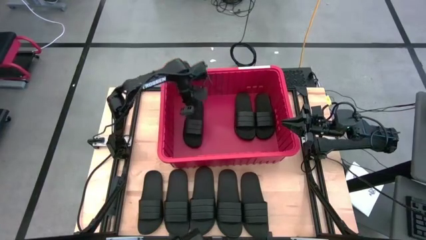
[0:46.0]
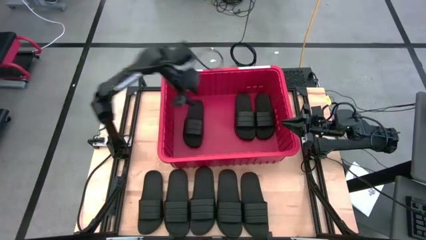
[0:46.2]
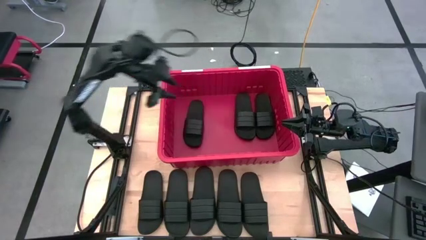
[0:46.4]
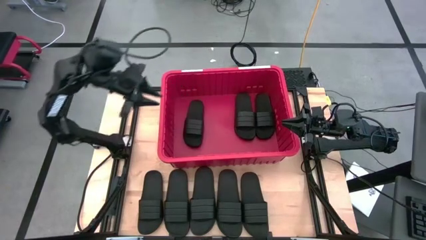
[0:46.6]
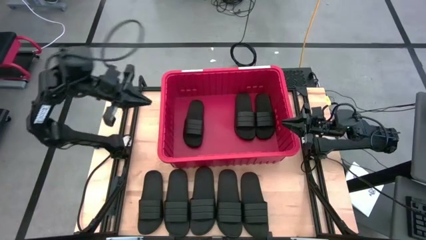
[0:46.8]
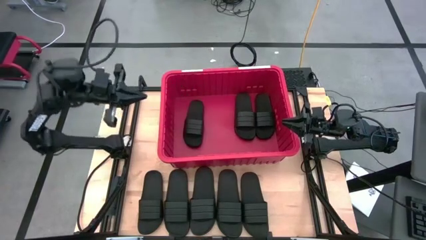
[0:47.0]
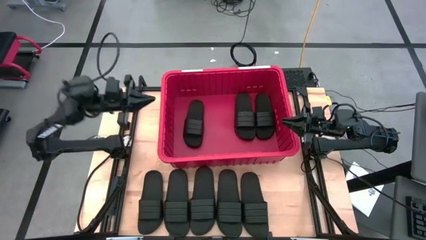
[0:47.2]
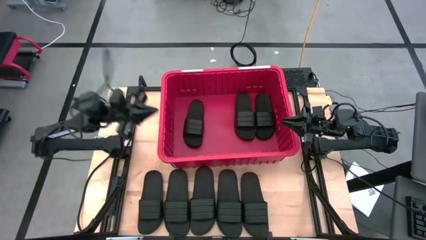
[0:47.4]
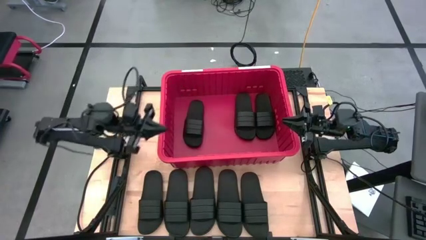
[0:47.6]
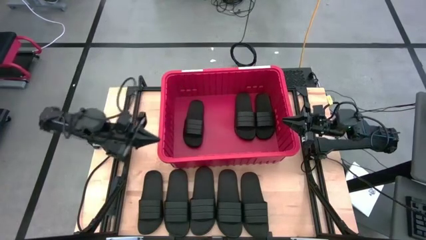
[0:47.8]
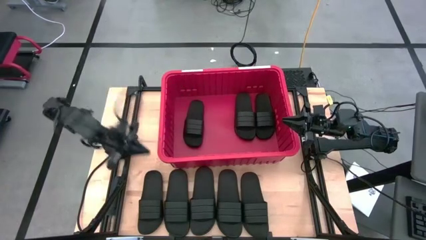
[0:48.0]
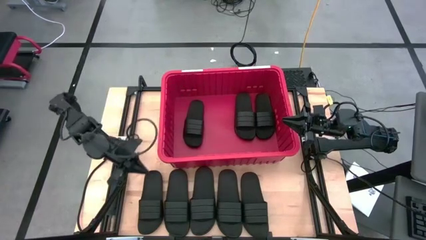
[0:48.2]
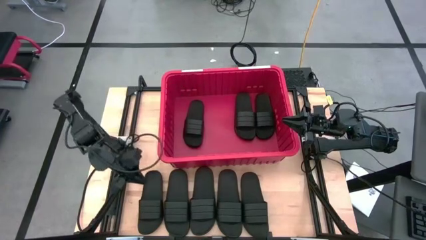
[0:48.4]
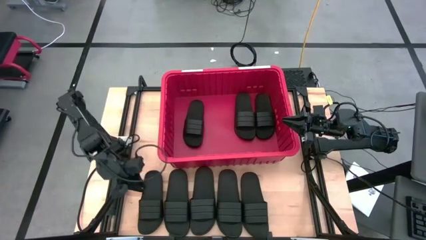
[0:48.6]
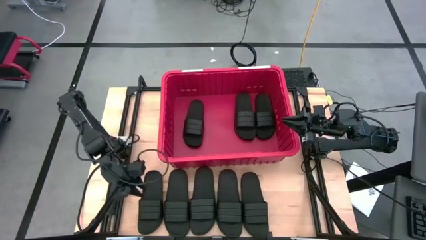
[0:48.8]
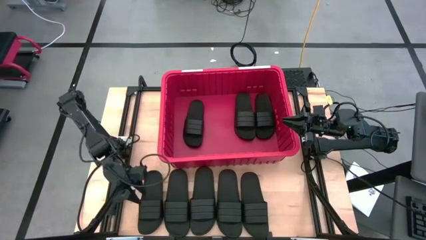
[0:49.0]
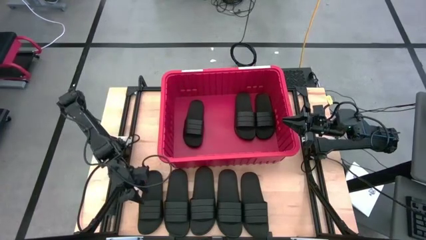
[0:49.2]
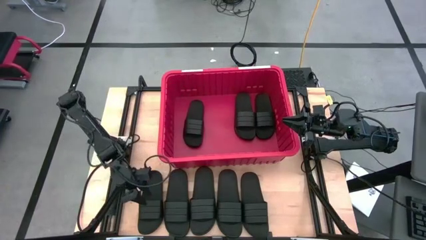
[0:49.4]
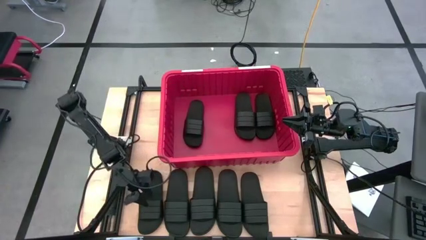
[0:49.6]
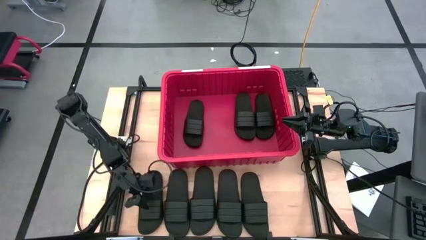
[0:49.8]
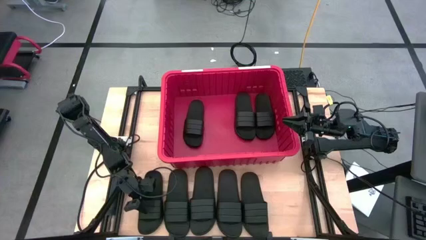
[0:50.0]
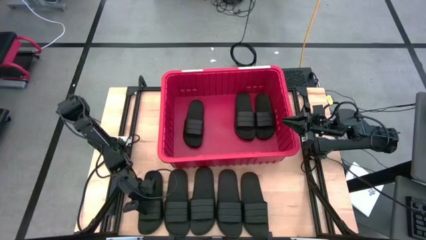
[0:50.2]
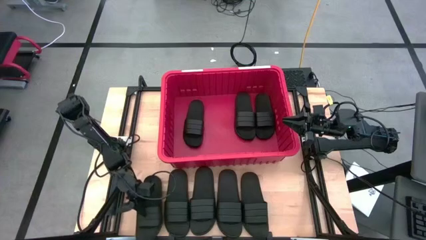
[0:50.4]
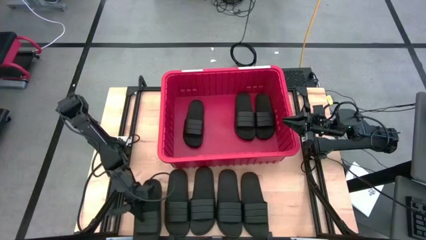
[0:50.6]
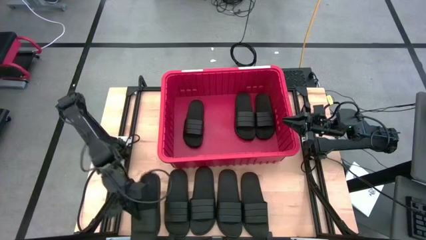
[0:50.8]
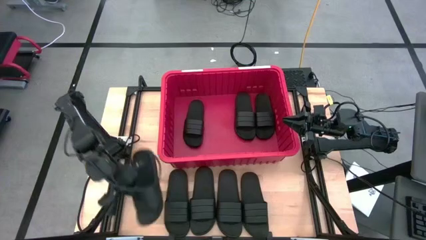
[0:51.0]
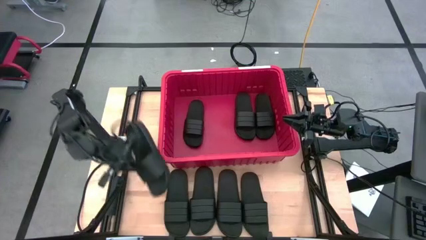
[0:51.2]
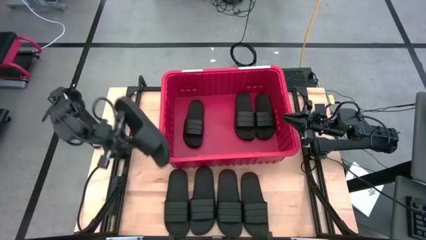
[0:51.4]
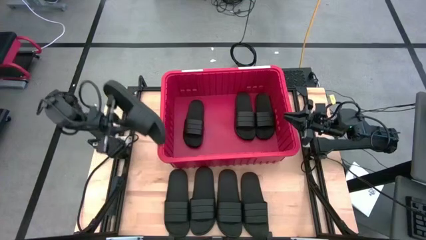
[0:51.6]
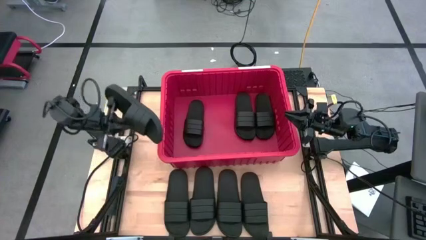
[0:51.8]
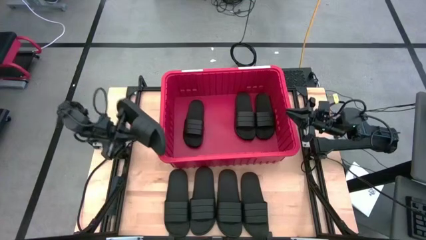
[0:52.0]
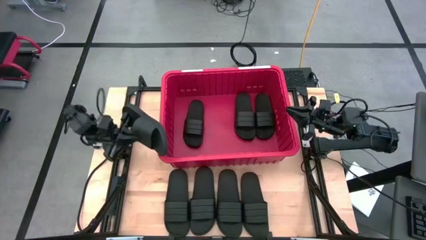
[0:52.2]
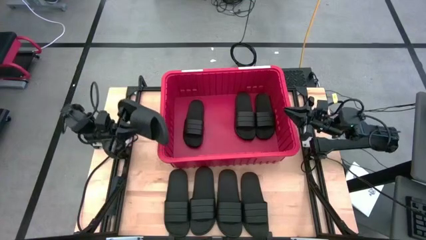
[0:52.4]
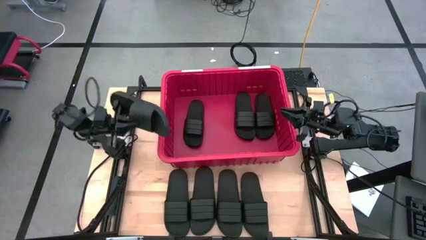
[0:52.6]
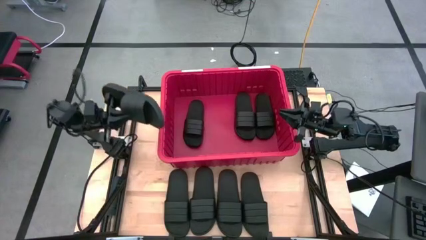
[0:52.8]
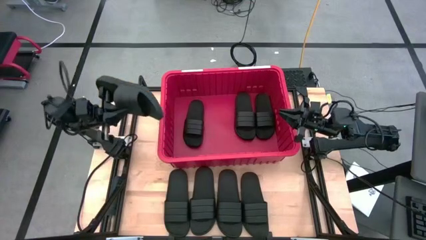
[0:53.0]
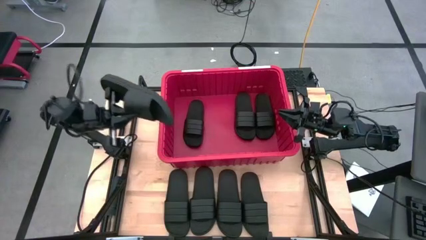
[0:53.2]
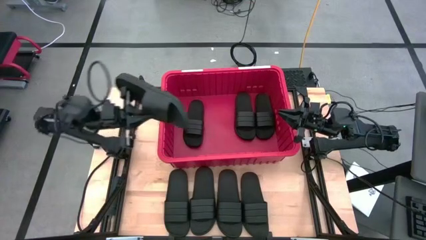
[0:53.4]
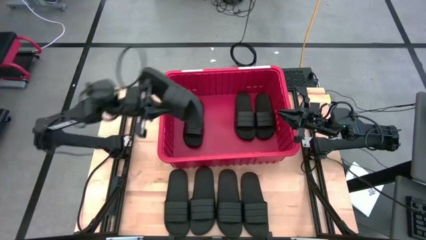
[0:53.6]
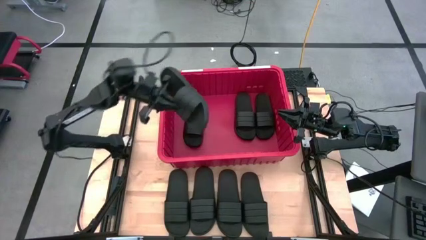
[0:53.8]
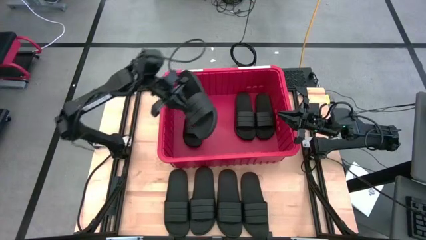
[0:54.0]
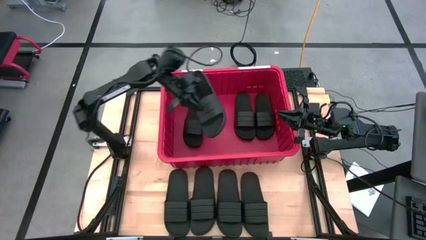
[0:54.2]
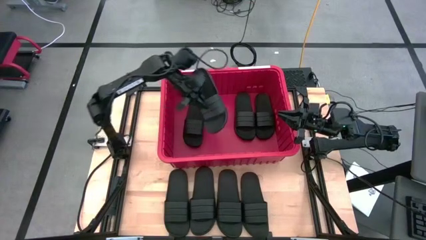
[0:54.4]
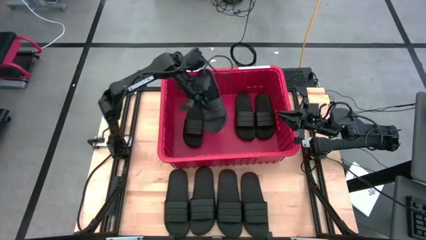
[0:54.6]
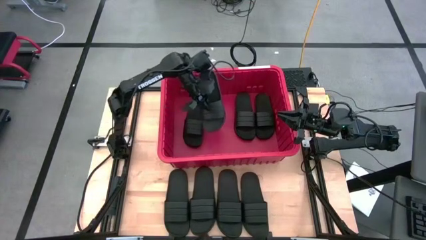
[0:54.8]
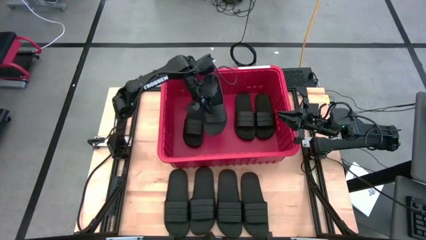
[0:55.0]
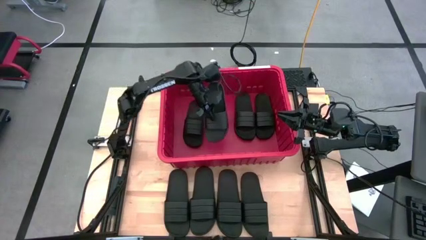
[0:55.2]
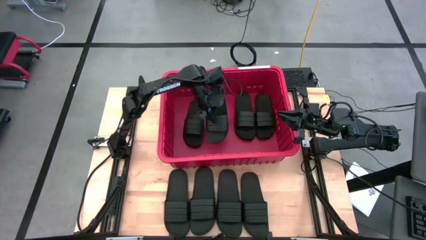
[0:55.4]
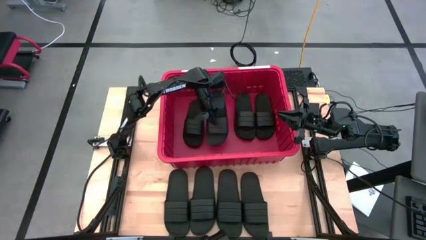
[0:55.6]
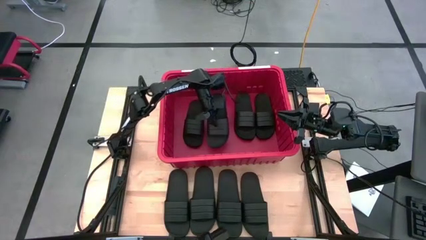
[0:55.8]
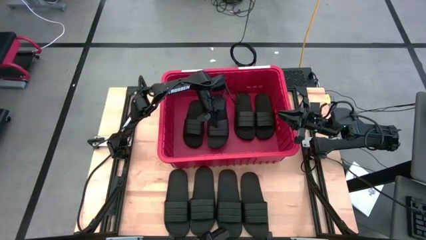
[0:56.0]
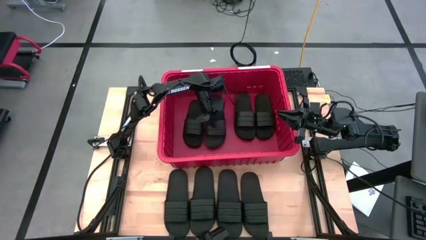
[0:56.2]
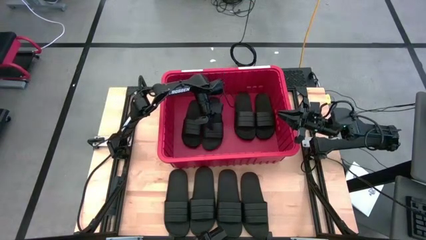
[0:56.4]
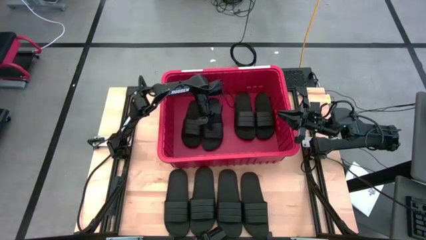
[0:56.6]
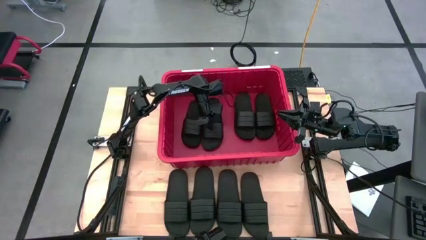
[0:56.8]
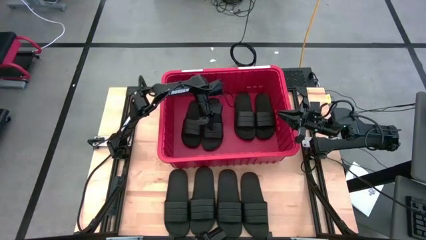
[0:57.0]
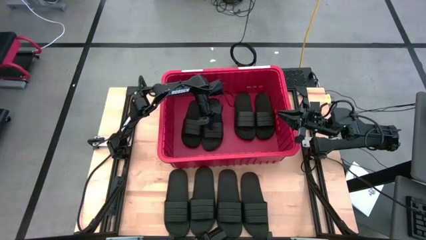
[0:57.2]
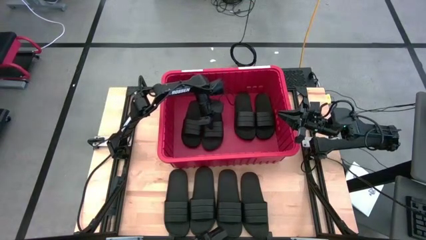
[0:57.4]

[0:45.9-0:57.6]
Task: Pick and place slides into bin
Put the black slides into the red bin

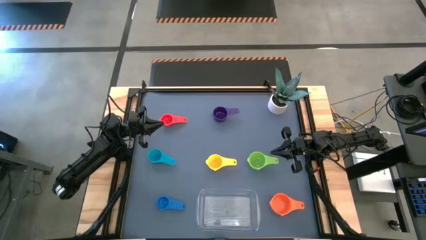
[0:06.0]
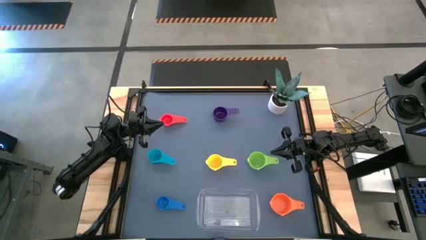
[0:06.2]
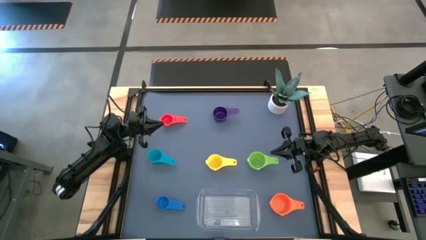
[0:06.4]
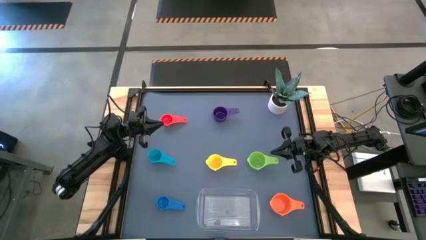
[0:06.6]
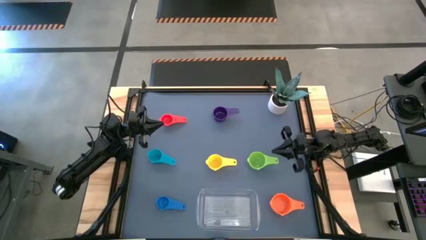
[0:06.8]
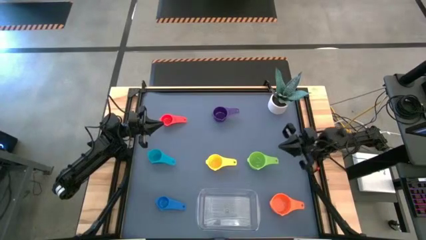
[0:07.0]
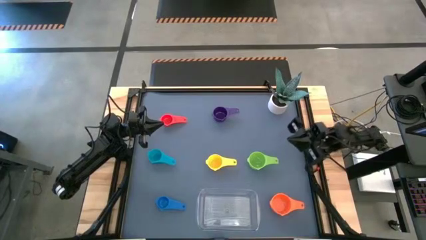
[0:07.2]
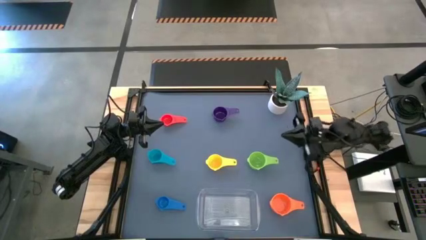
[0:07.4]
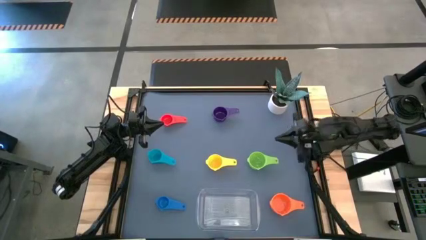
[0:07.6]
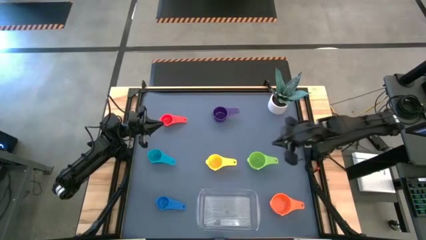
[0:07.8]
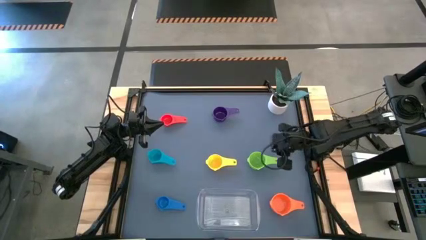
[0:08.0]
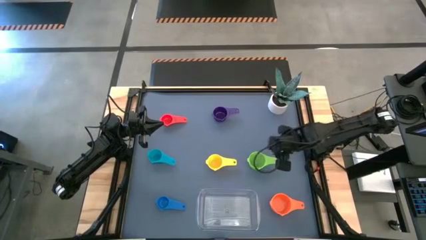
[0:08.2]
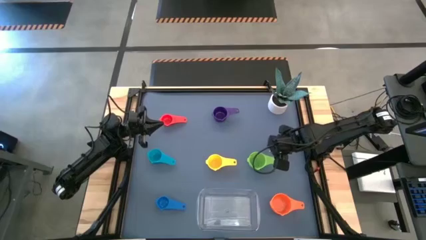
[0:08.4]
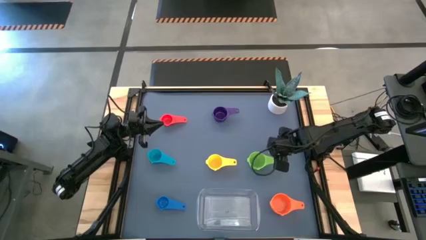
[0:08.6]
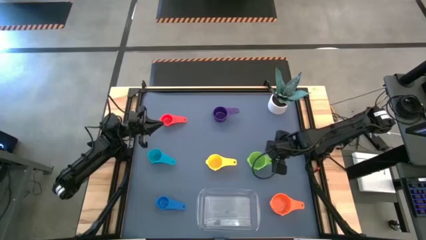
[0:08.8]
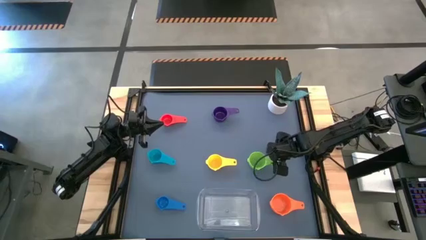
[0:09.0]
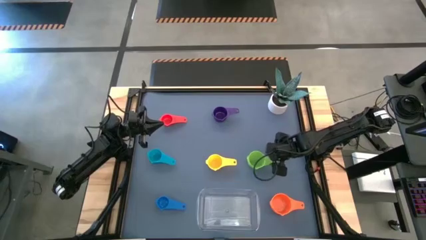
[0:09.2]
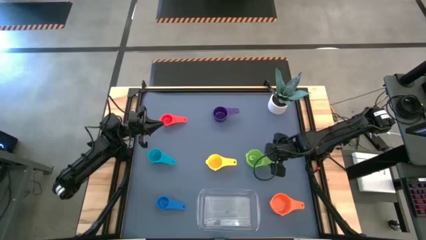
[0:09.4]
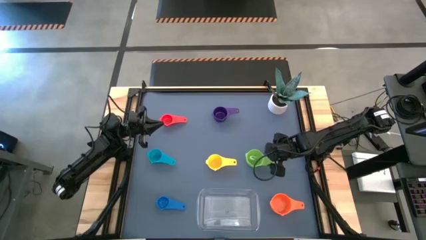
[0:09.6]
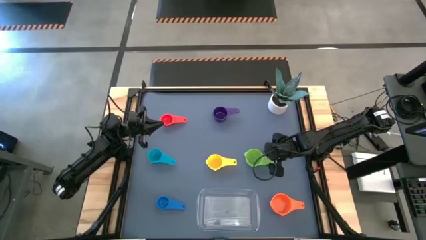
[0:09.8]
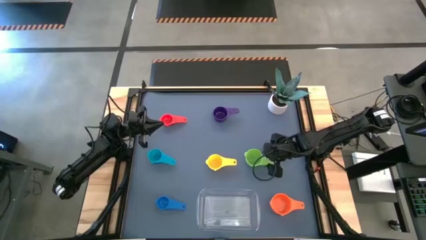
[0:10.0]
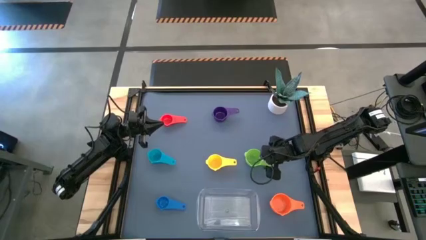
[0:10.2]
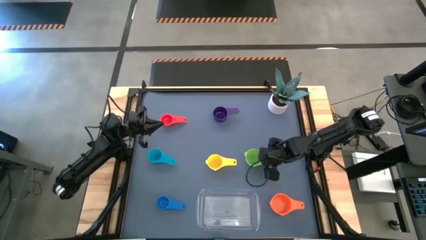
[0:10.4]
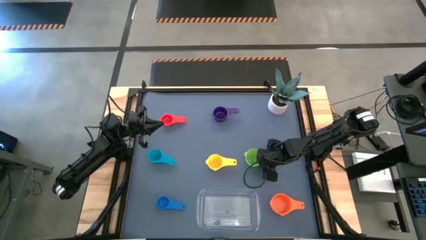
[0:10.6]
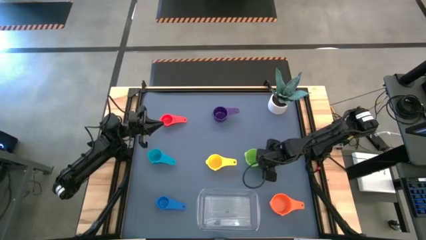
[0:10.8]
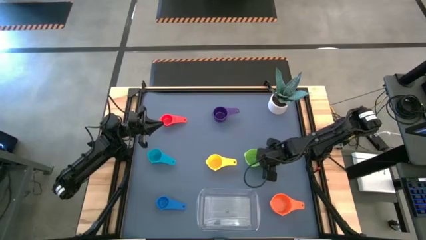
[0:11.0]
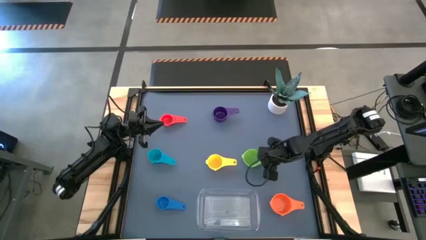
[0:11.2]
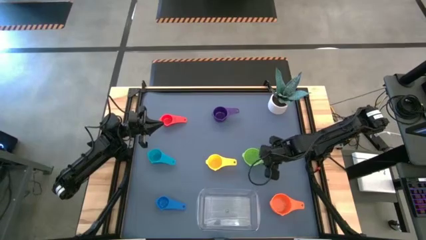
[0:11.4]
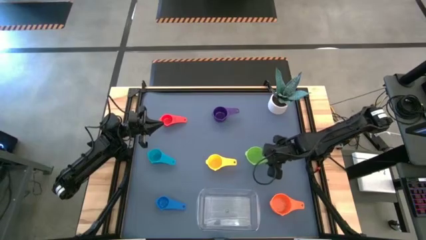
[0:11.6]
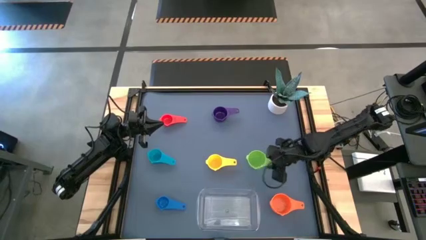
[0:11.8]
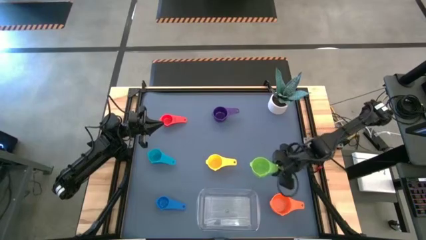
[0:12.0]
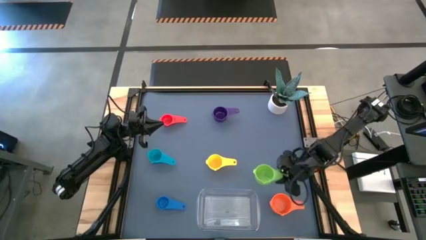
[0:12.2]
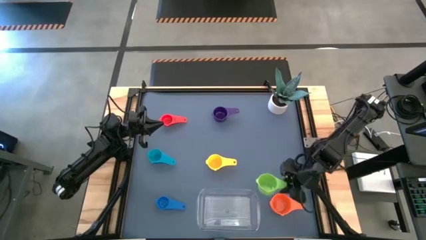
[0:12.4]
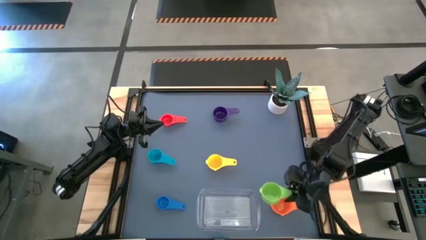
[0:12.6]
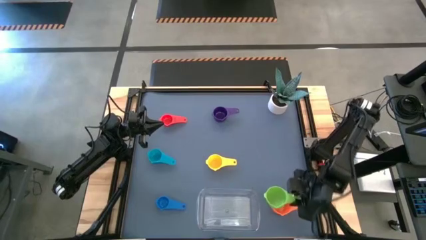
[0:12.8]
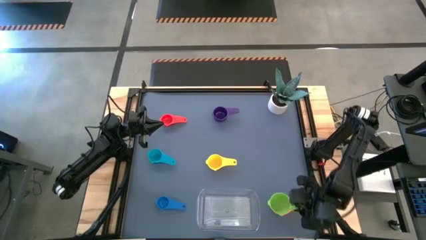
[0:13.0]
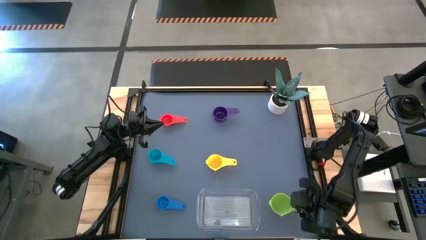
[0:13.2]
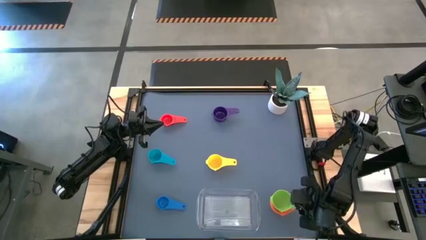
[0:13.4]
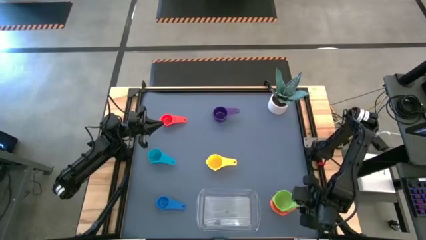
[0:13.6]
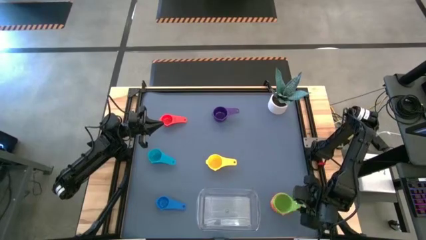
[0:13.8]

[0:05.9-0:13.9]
Task: Nest measuring cups in basket
Stack the green measuring cup on top of the orange measuring cup
